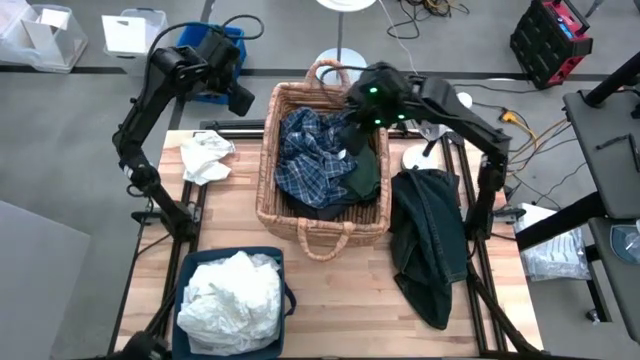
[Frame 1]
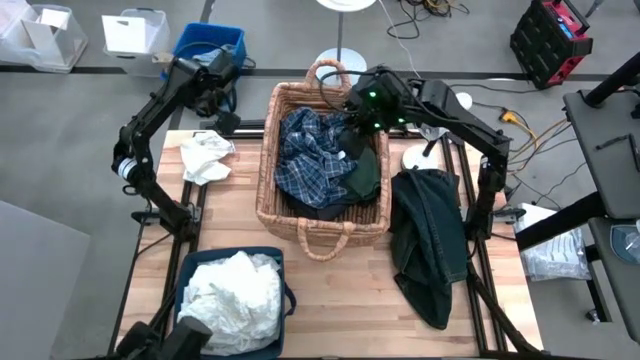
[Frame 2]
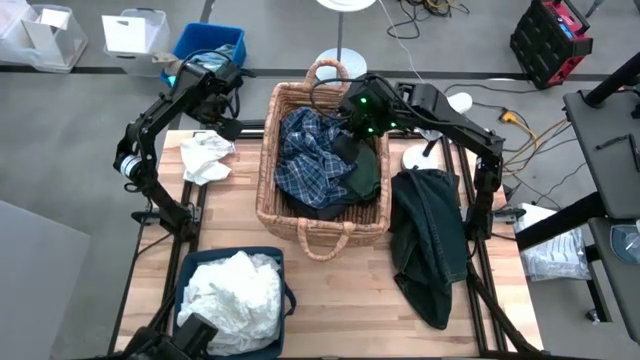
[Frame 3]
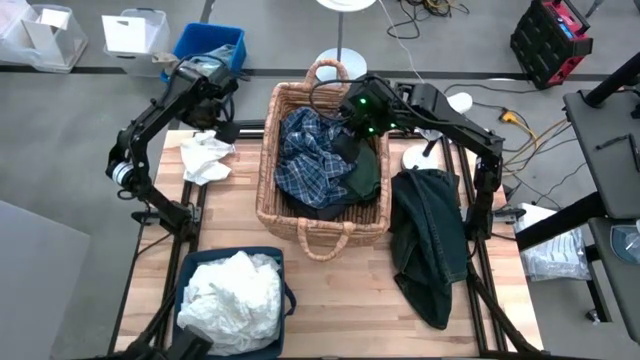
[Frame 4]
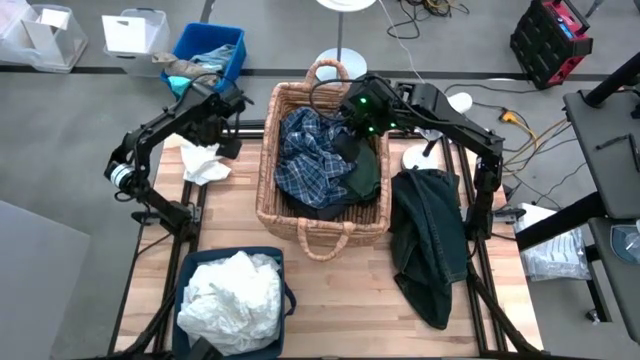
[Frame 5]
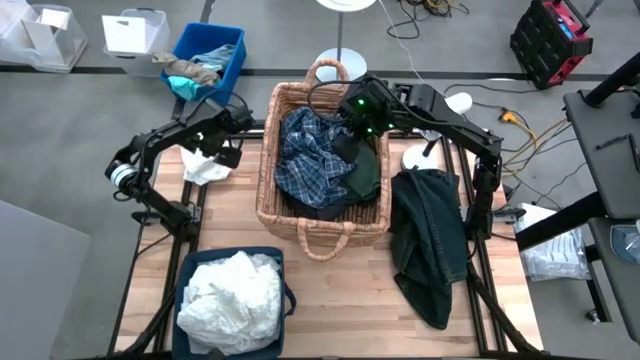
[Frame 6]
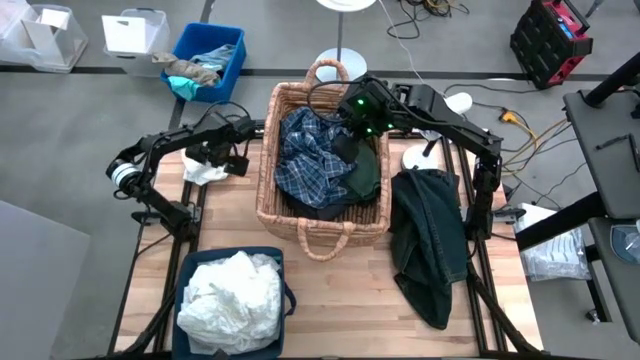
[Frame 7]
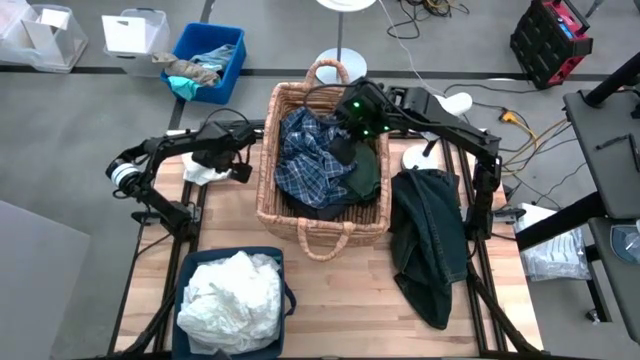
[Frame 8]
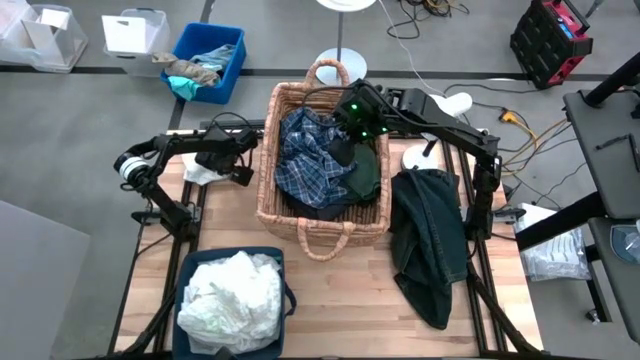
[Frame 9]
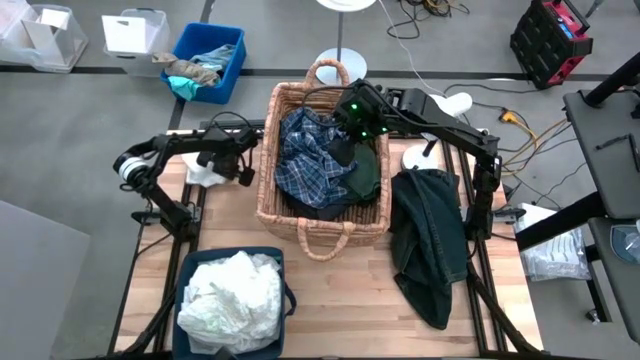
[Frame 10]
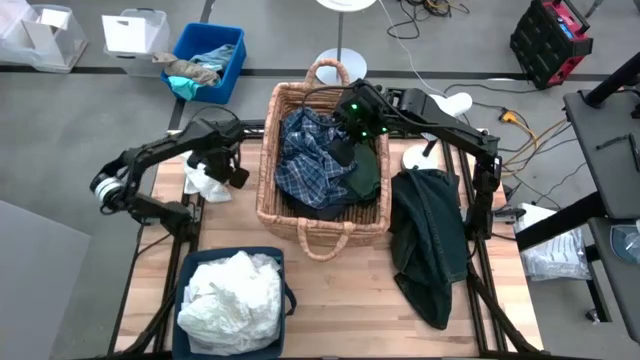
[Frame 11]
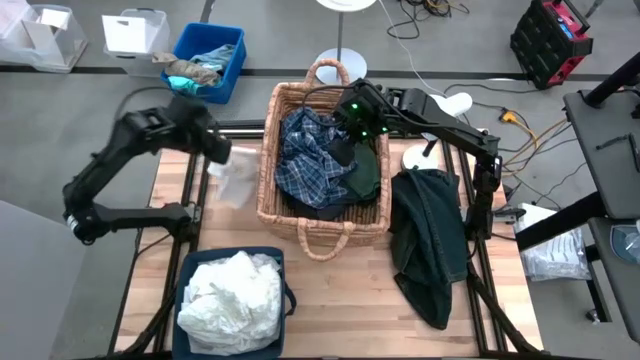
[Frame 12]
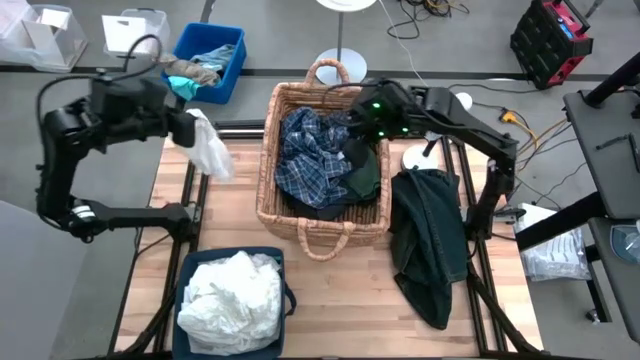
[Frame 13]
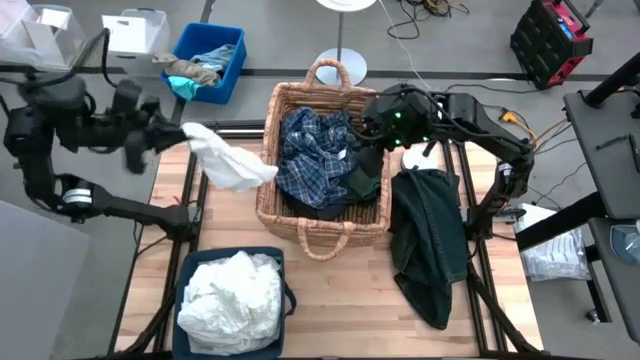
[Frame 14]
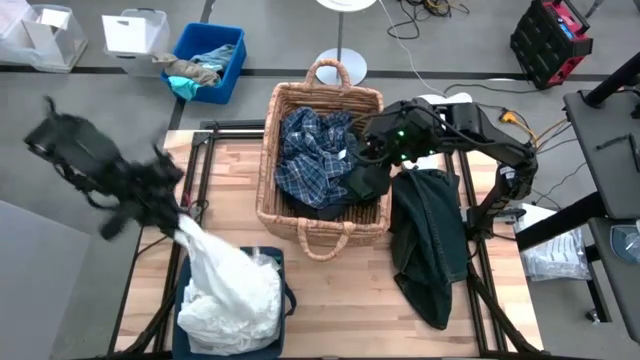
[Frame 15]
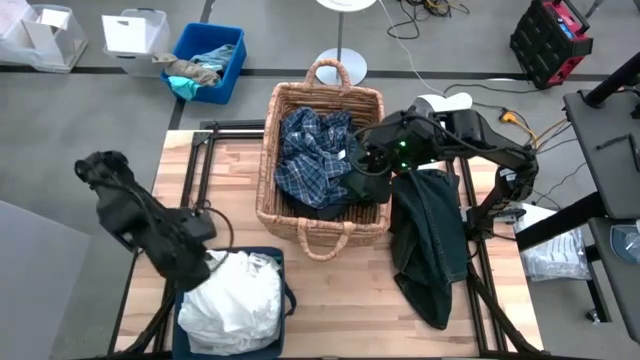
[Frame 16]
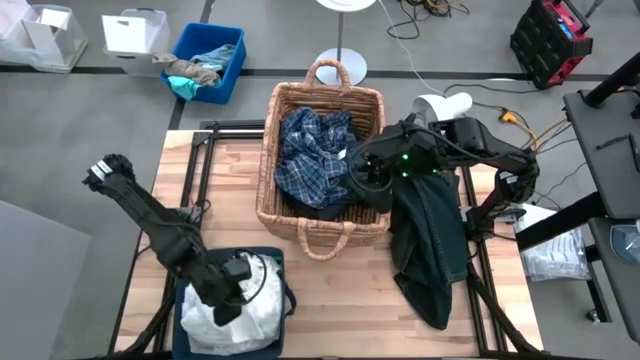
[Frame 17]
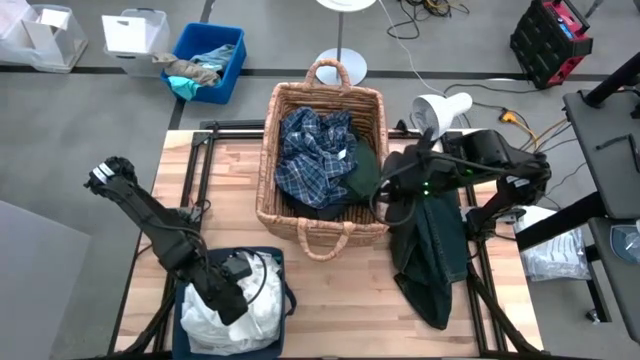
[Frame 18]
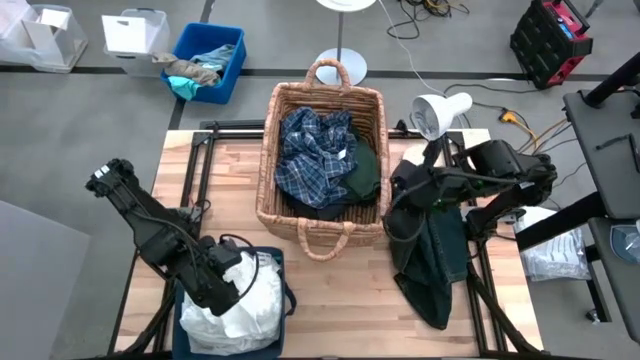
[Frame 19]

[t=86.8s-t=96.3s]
Task: Sort clothes
Put the white shorts into the blue laundry organizer

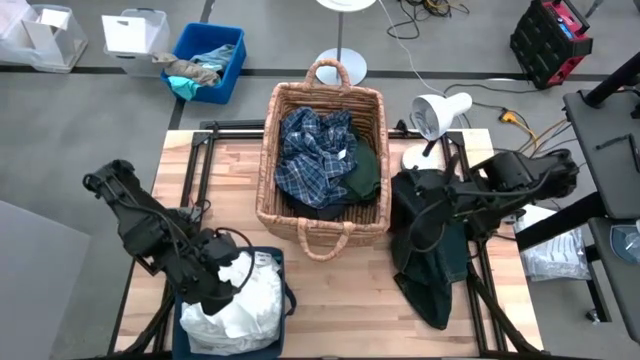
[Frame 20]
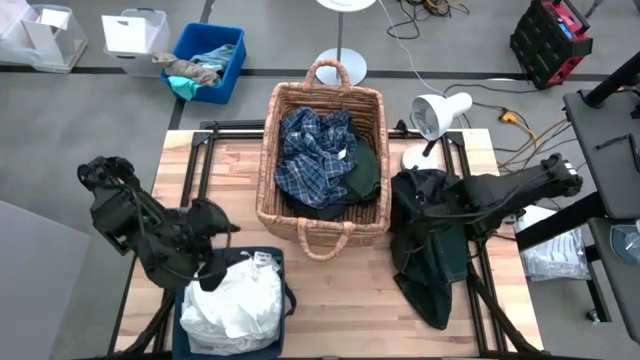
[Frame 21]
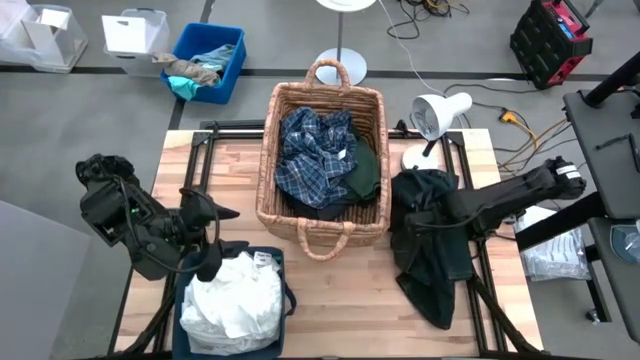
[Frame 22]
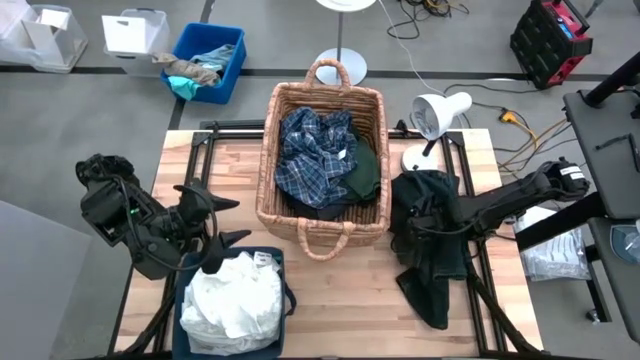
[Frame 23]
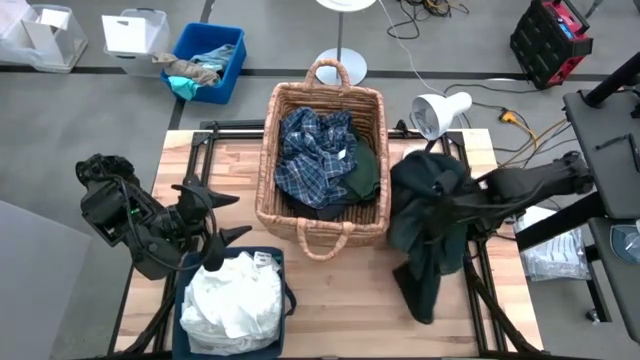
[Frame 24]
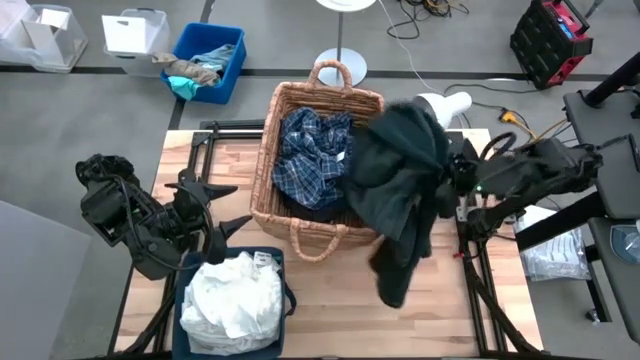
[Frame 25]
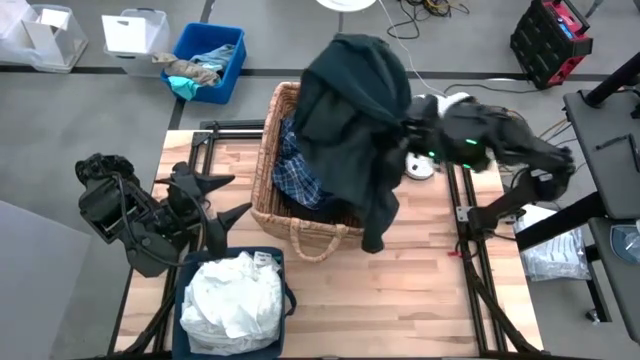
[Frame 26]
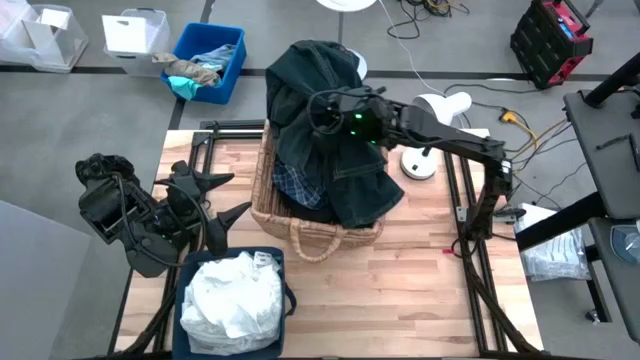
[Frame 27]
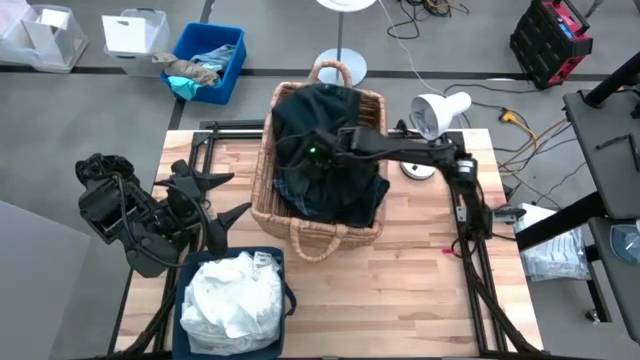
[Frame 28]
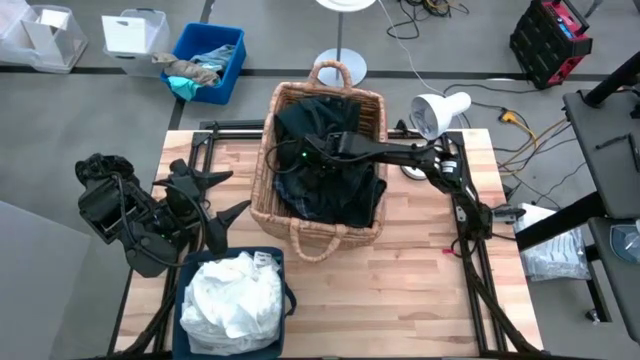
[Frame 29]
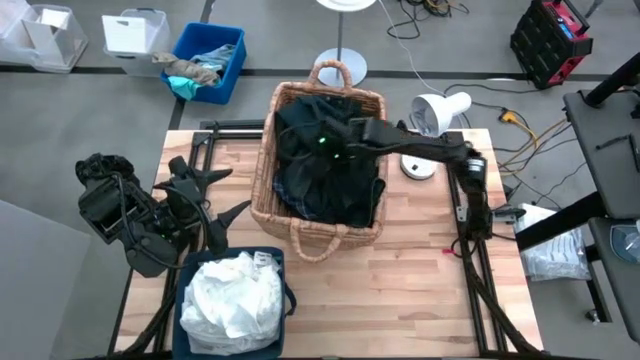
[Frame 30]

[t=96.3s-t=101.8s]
Put the dark blue pants into the brown basket

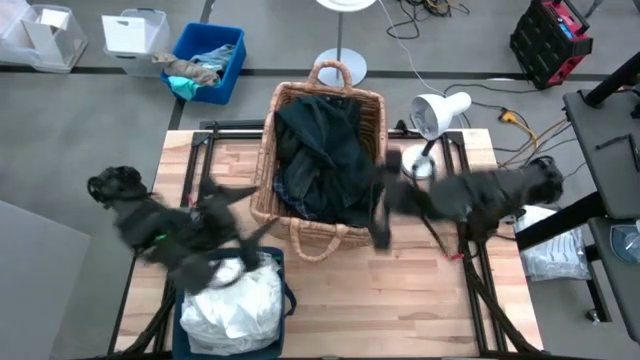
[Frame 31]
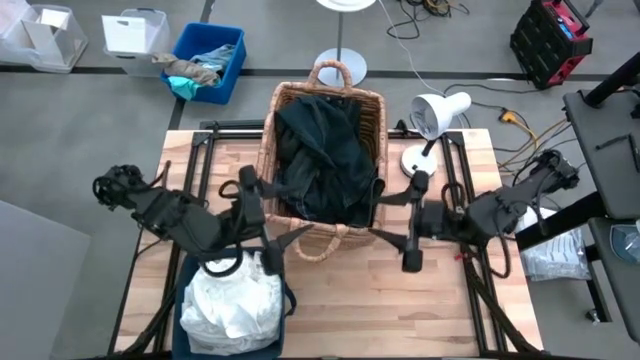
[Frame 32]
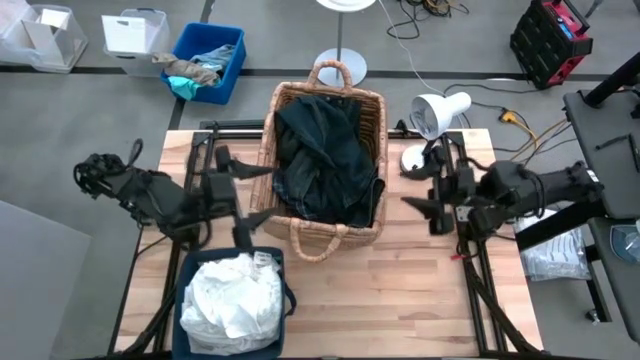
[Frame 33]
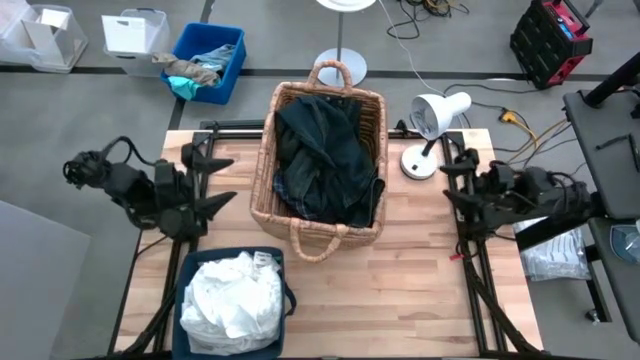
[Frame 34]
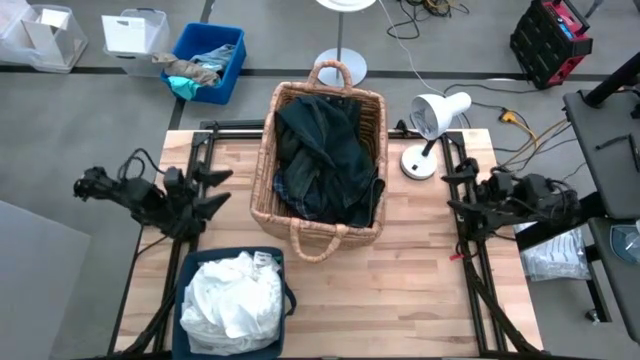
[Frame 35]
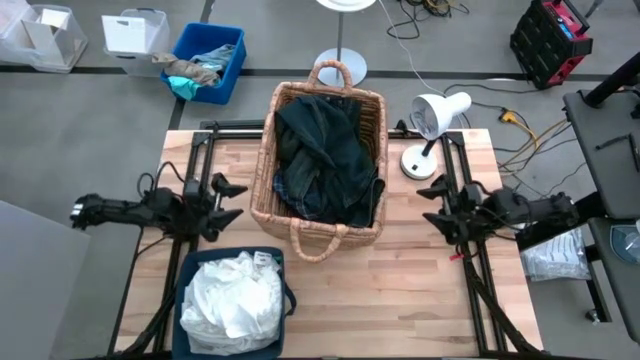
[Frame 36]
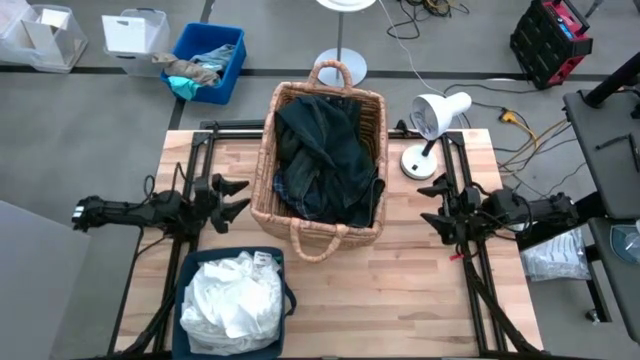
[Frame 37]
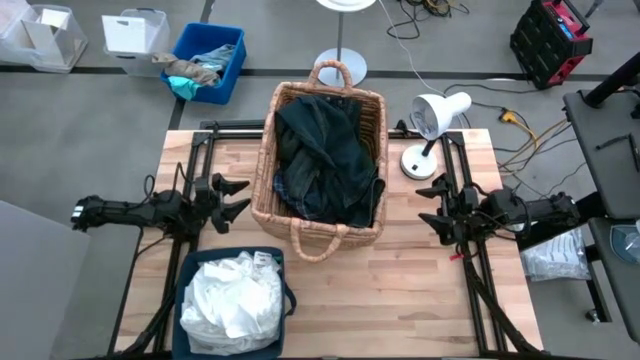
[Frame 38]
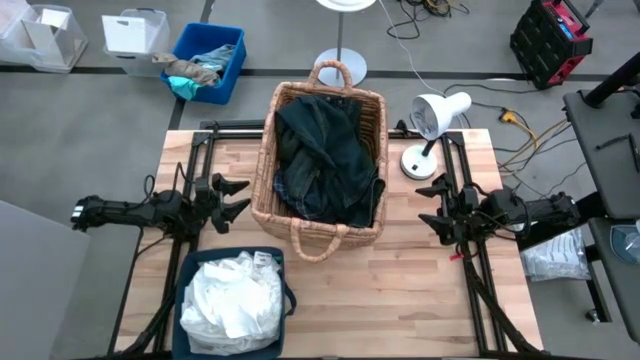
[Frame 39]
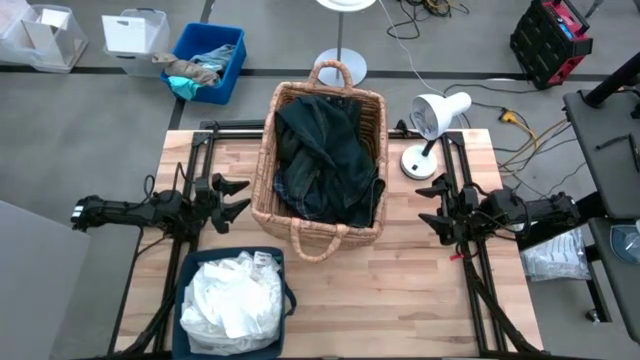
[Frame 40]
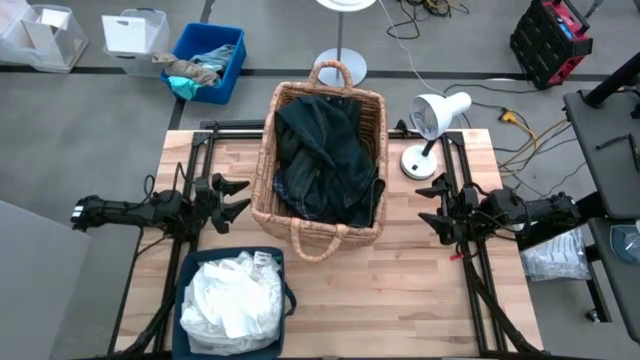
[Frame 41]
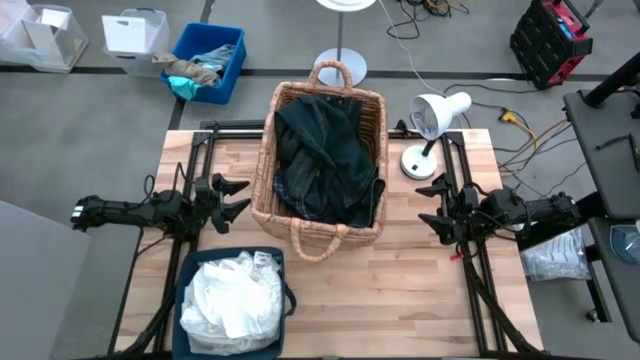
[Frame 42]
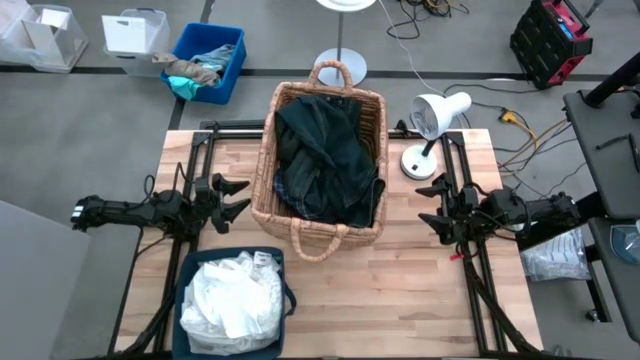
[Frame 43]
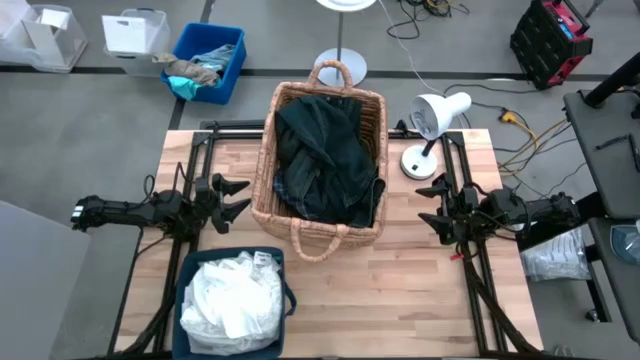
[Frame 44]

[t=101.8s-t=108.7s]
Return to Home Position
